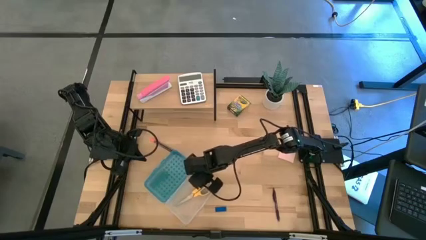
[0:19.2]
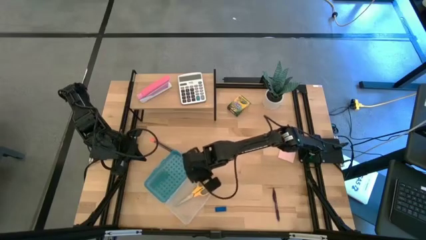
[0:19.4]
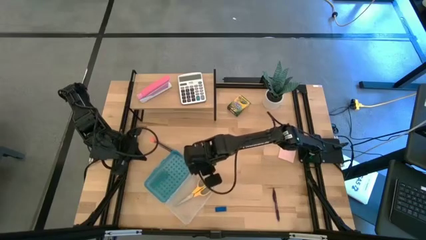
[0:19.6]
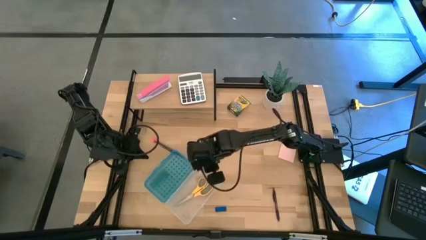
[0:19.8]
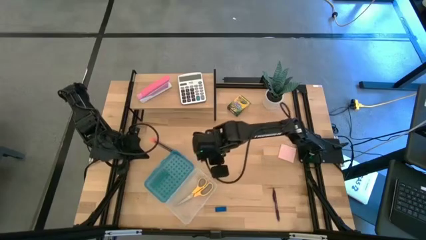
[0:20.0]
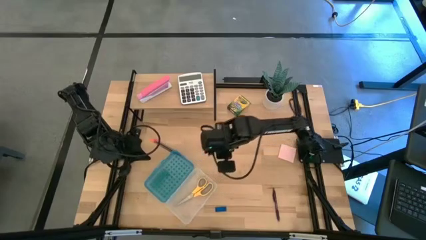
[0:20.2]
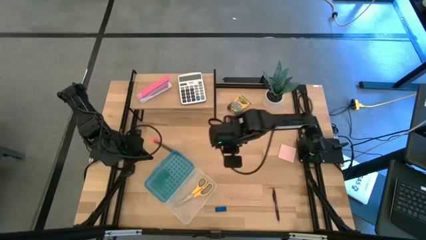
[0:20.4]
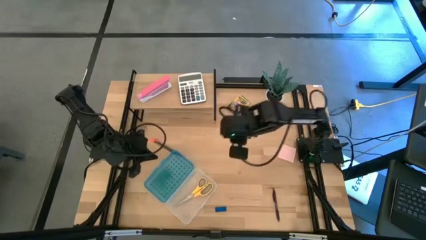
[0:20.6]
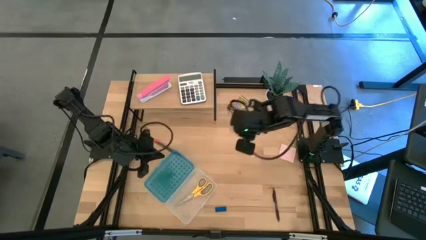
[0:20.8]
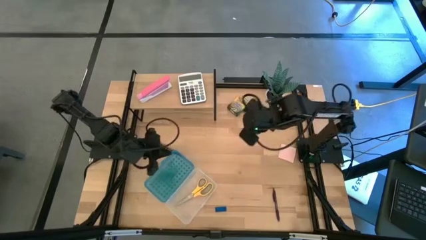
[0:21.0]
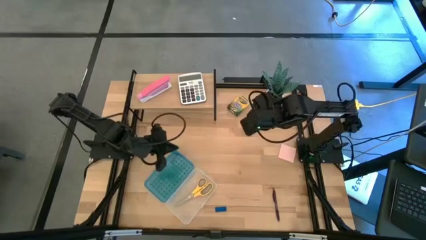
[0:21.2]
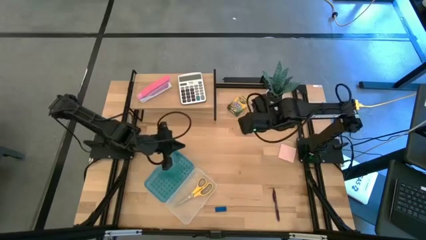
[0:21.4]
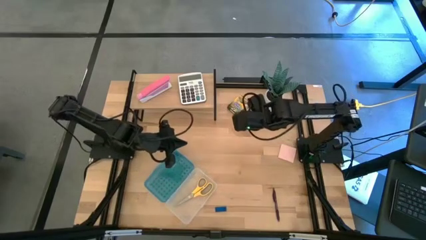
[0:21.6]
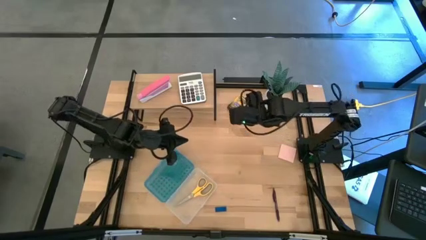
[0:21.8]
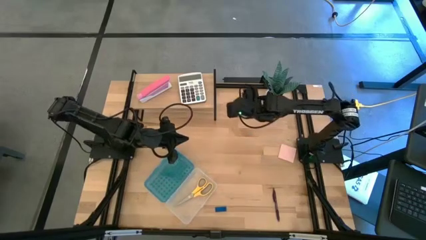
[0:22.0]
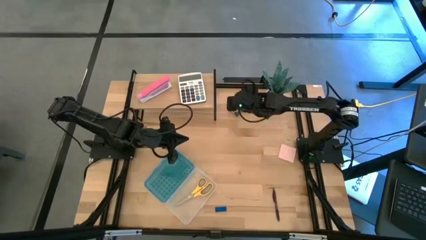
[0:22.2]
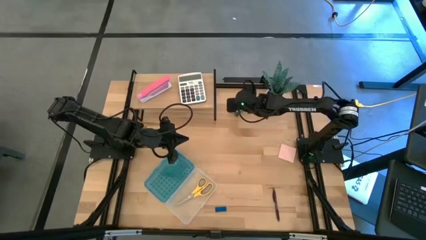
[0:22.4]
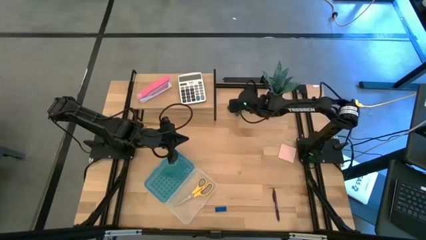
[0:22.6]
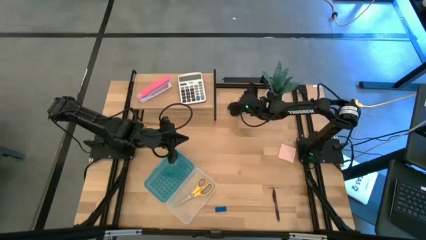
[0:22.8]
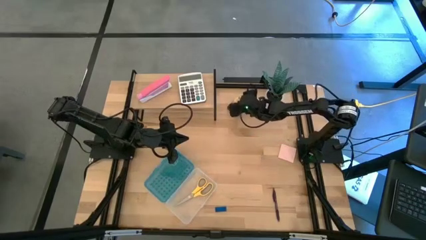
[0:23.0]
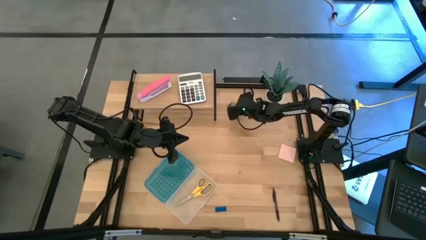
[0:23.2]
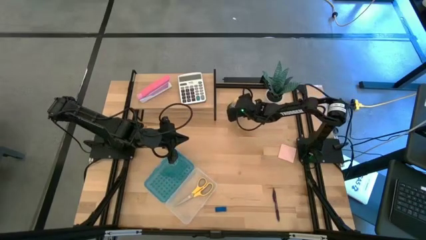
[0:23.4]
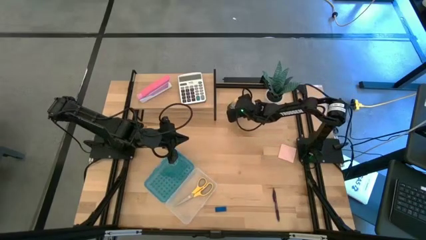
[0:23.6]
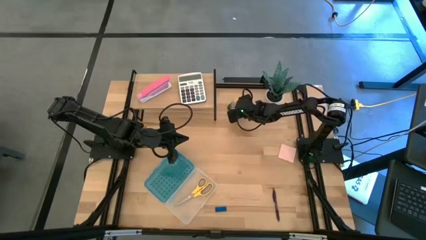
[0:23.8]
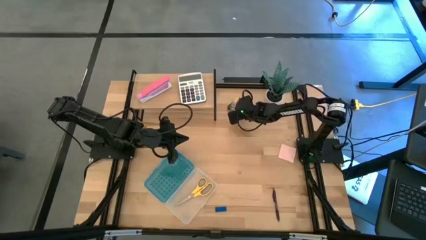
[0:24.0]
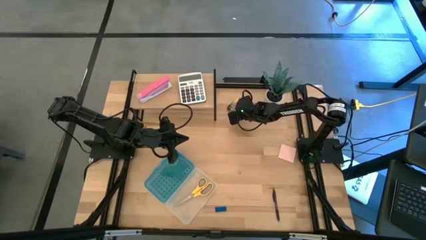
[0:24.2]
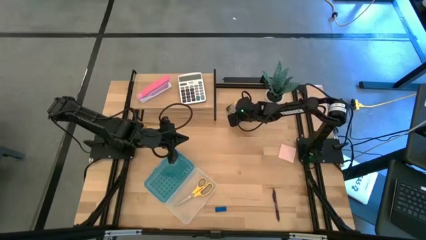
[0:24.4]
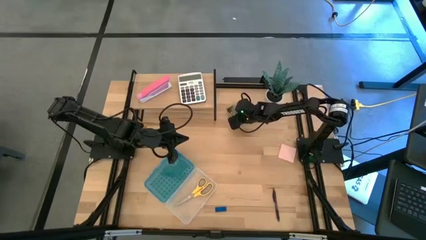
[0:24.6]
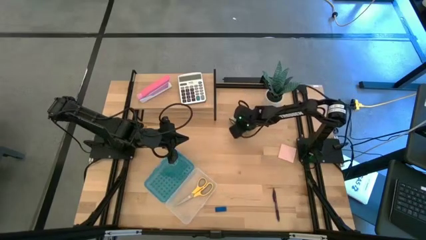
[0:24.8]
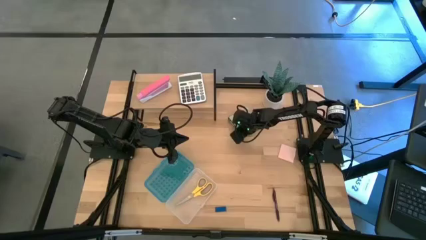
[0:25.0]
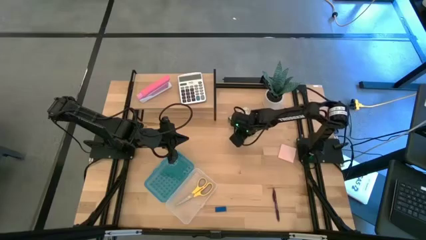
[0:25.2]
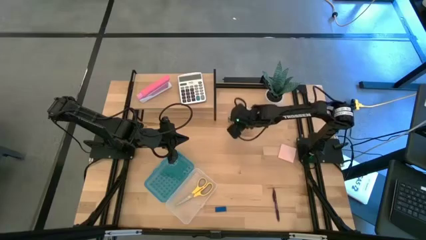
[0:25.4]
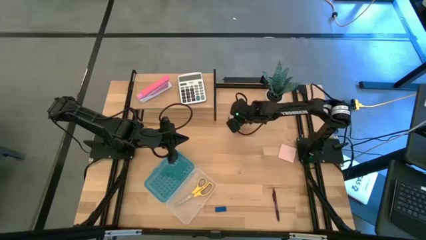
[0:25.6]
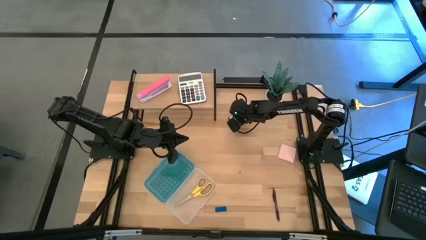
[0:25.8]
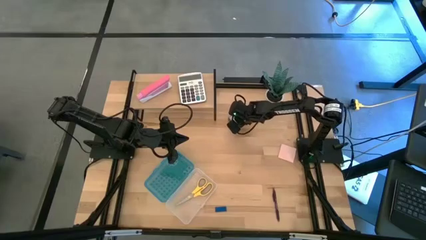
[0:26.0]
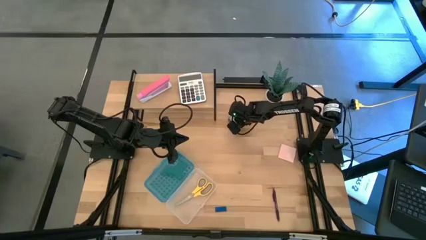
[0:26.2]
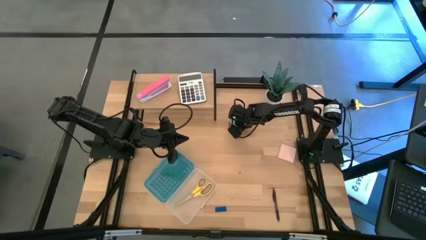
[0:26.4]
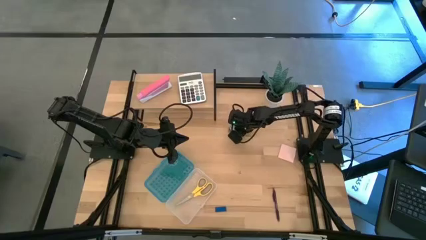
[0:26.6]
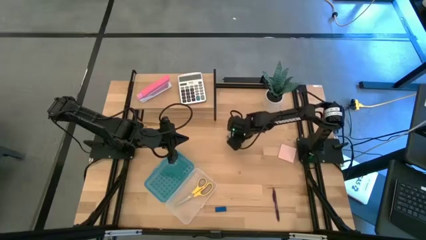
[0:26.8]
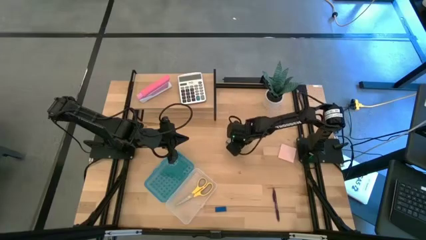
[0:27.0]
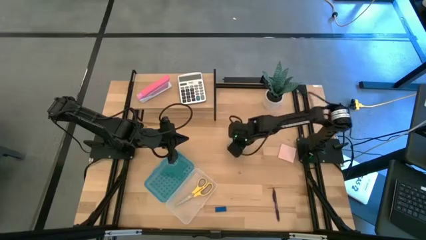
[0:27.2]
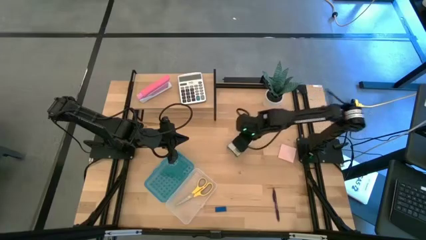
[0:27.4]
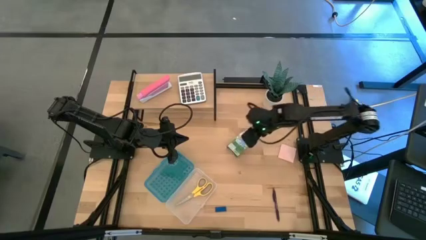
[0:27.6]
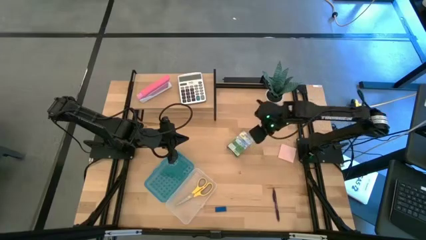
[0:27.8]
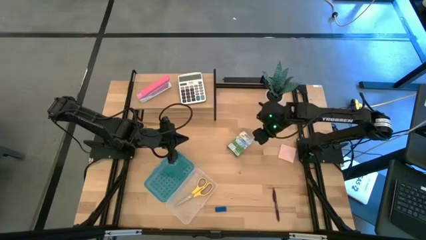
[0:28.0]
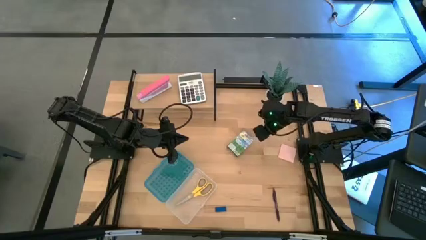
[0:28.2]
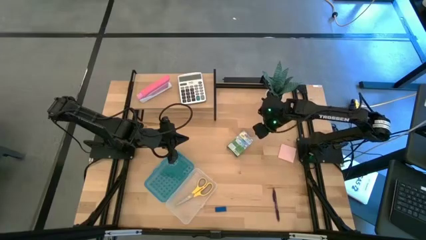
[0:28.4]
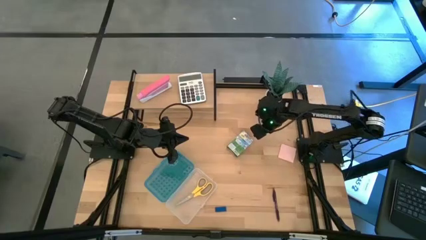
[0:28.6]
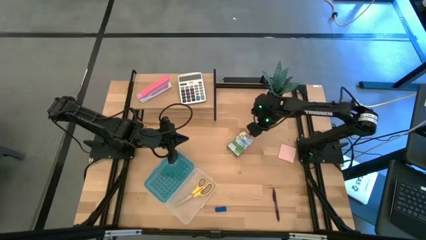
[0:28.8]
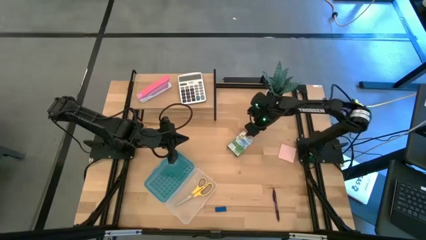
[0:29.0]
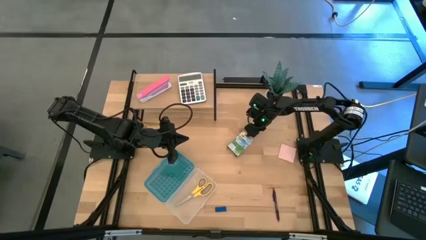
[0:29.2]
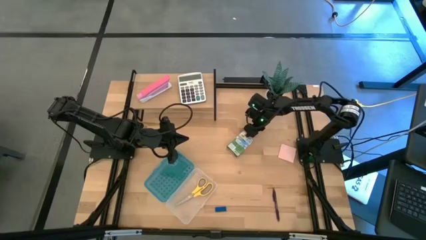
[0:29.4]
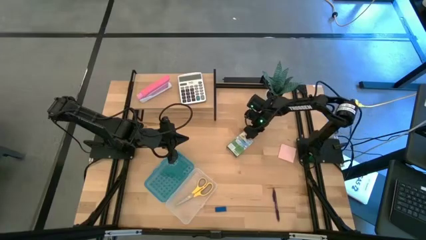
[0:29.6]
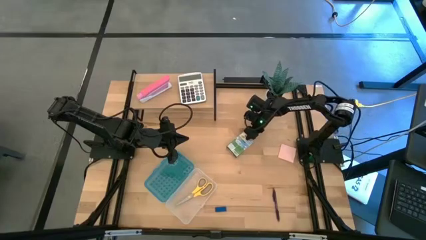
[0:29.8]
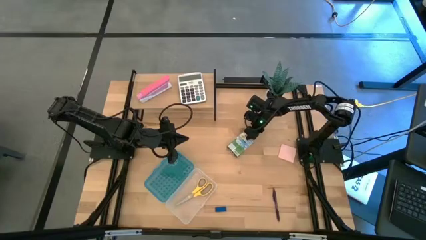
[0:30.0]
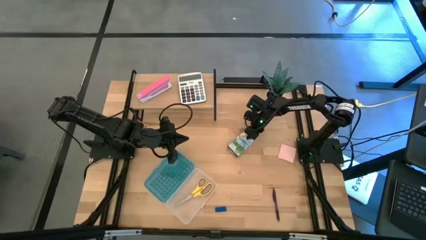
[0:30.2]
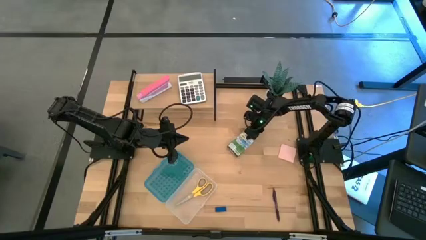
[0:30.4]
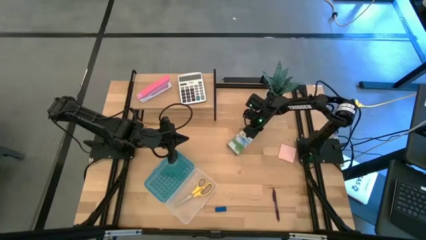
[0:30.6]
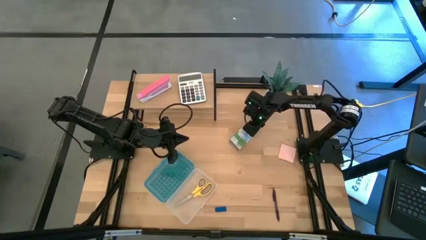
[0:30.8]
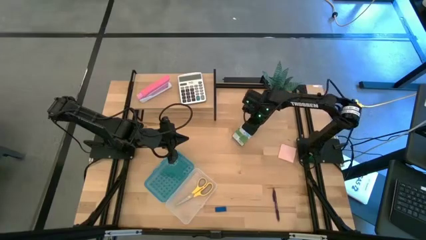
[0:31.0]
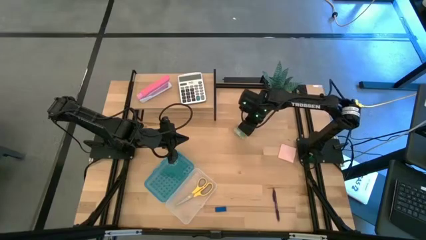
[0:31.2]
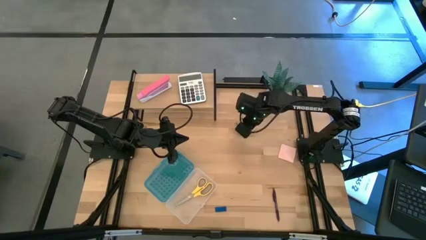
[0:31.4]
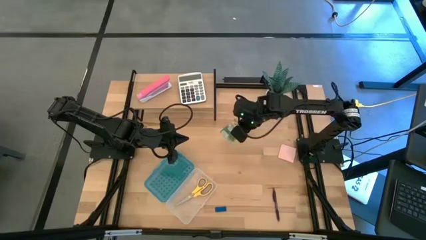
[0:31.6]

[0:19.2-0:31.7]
Task: Pack school essentials
Put the yellow crayon box into the blue supply box
